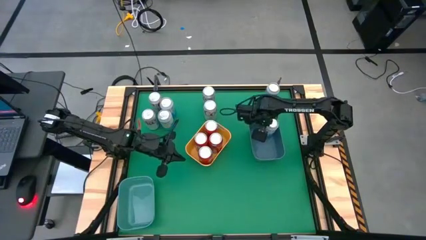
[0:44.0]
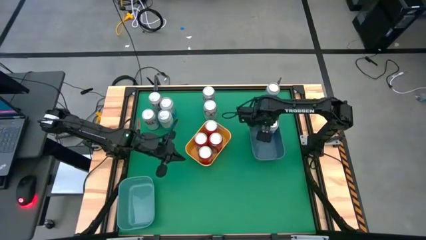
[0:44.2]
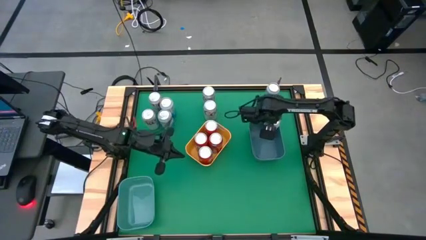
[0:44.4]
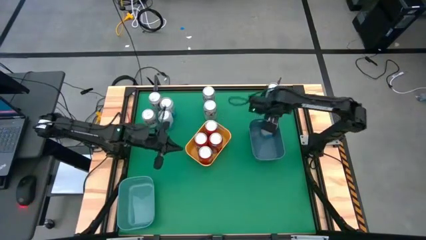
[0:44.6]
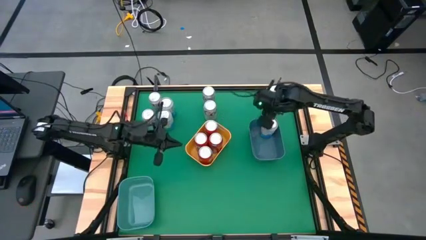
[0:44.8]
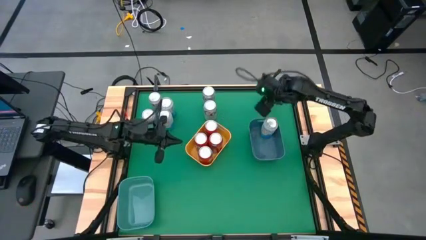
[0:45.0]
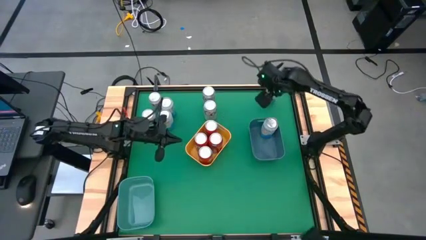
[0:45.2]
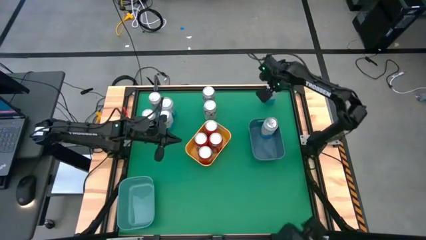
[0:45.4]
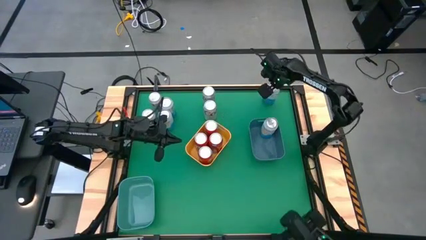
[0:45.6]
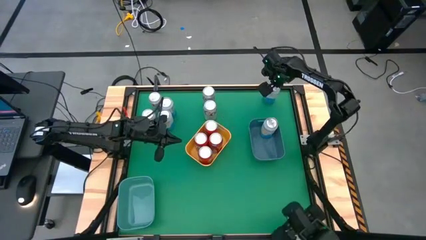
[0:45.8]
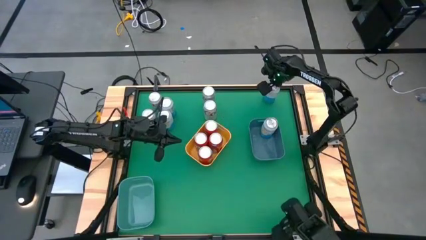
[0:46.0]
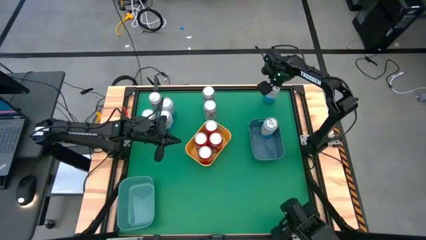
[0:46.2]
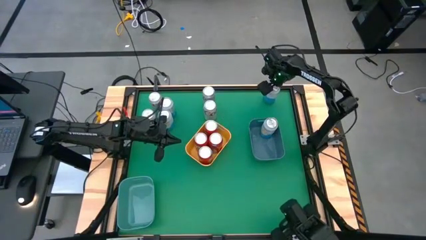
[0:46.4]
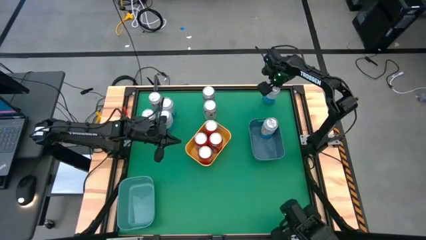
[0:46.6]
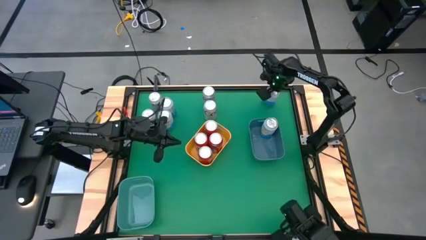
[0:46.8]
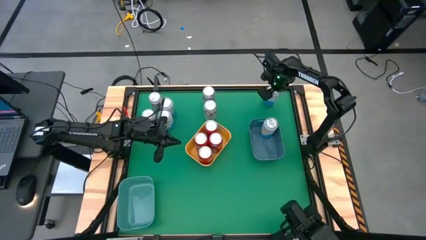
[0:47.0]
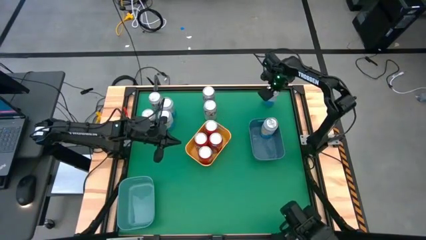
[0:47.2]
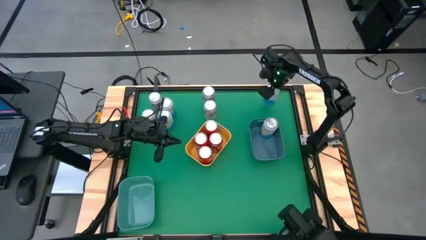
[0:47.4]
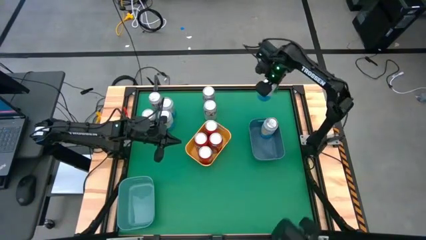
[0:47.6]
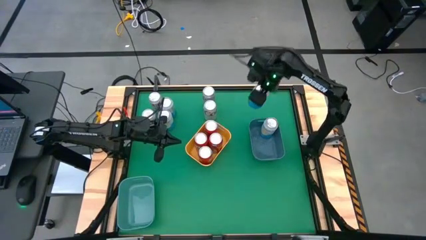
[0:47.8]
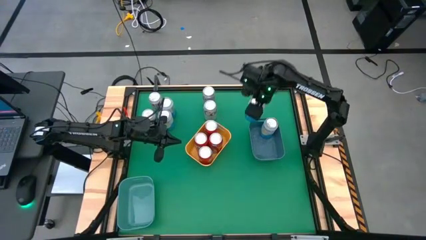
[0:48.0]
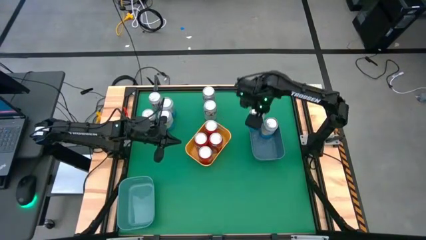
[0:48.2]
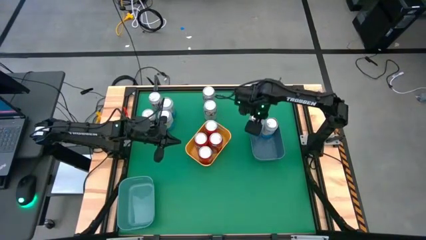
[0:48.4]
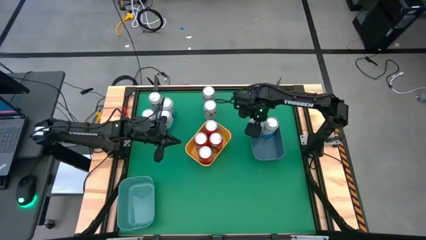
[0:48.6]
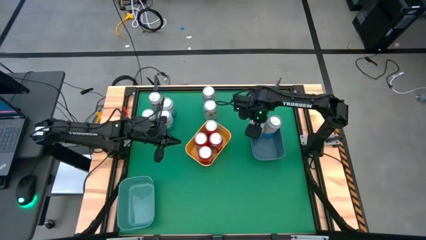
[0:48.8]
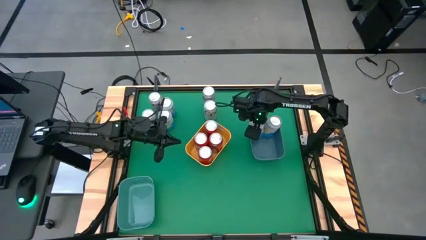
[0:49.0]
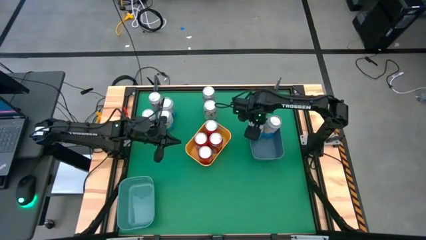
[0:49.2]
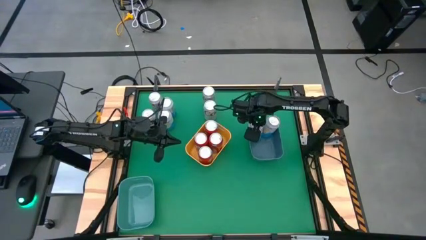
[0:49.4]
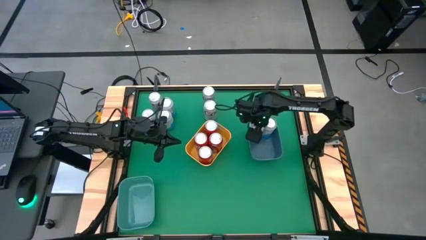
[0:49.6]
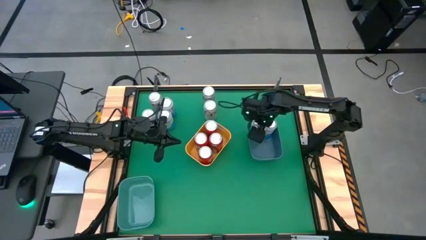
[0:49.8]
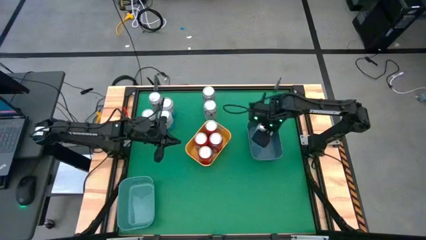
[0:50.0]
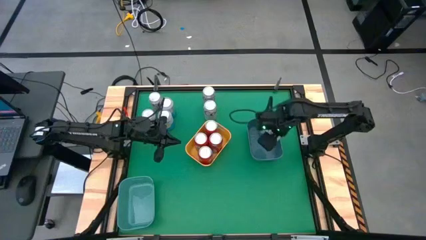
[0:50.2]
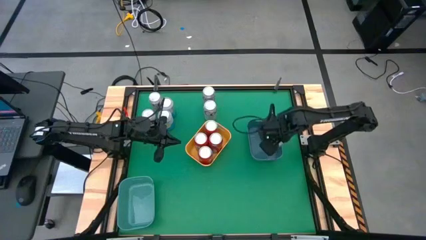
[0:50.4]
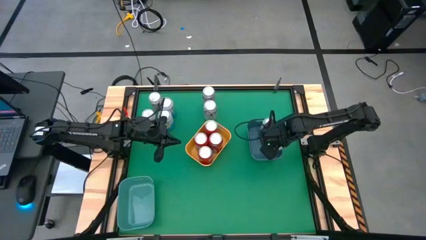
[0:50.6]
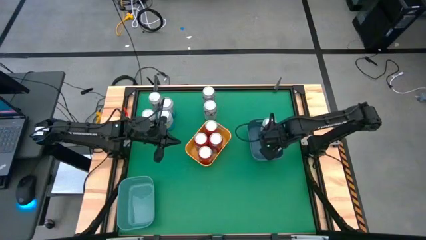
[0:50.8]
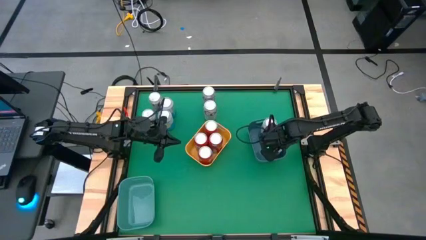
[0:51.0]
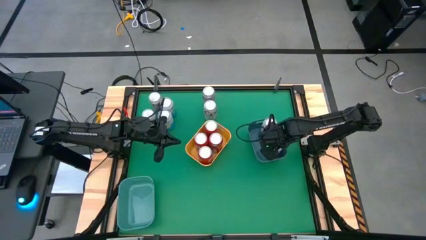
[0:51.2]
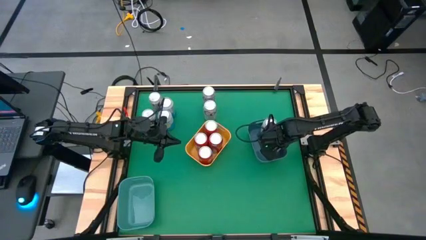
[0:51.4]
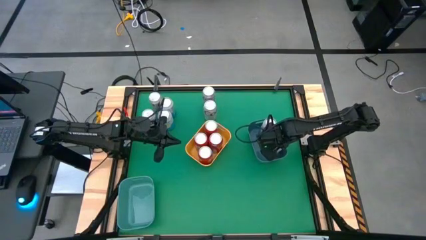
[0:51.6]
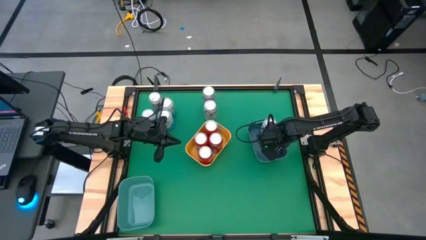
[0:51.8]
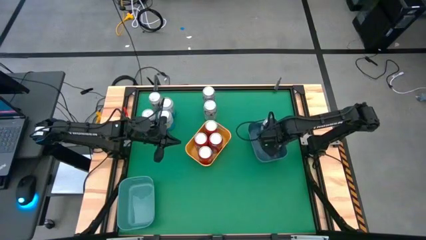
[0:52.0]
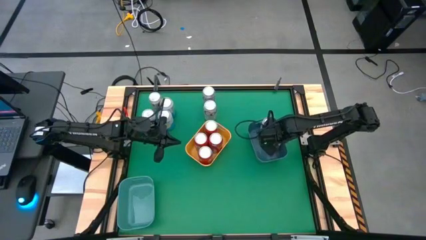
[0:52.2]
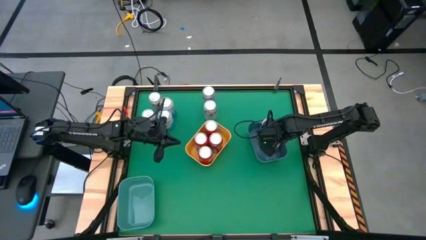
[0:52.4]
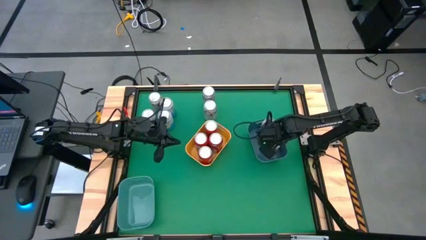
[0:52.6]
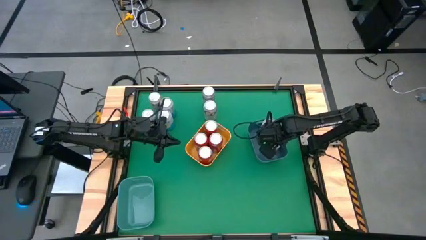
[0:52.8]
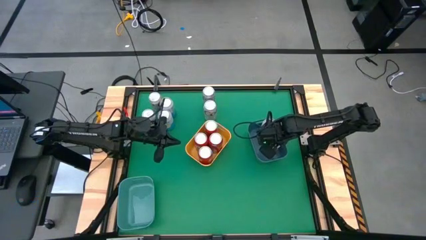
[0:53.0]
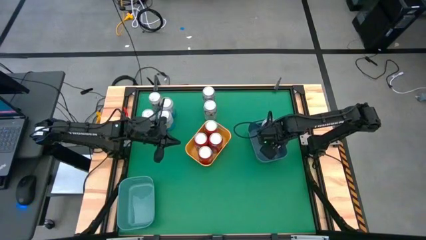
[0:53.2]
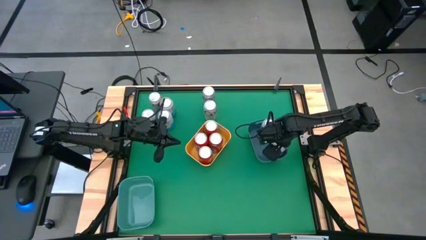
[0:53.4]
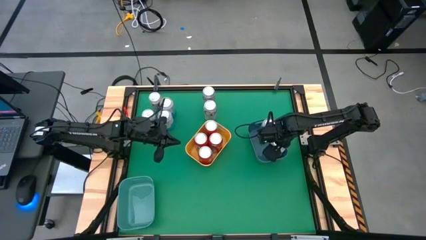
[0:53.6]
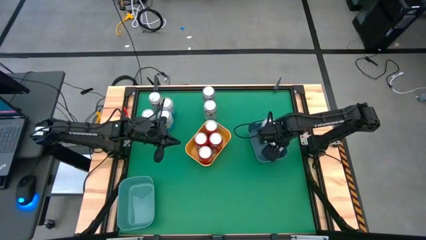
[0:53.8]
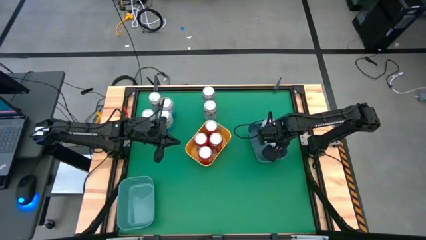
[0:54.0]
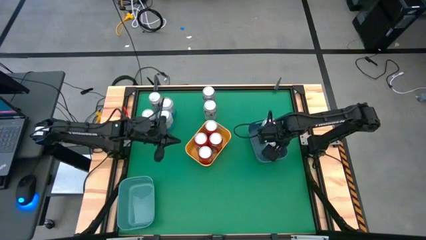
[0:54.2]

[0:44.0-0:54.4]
Task: Sort soda cans
Put the top right blue and white soda can into the blue bin

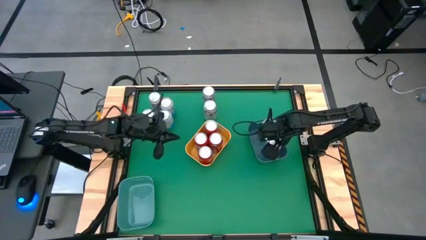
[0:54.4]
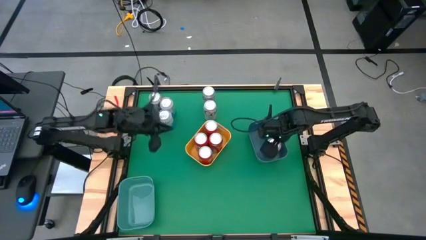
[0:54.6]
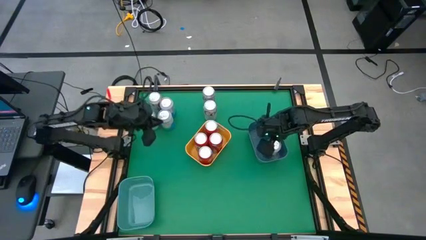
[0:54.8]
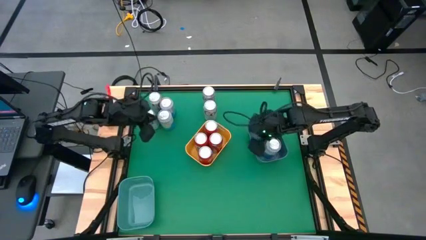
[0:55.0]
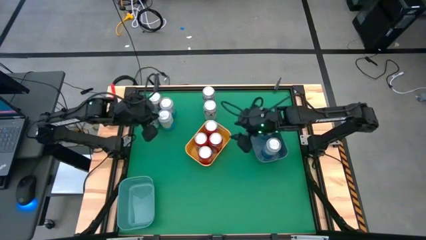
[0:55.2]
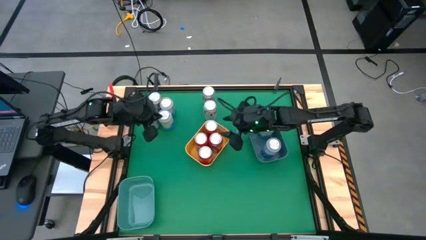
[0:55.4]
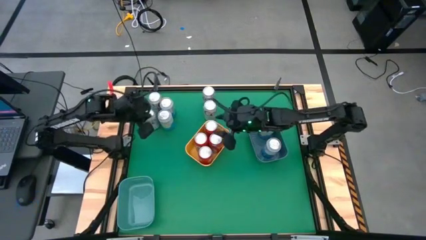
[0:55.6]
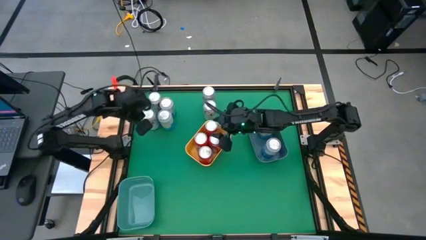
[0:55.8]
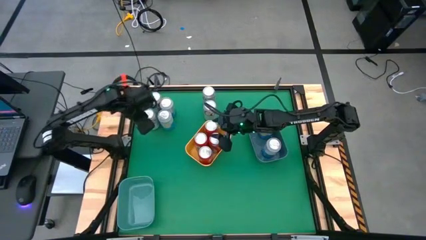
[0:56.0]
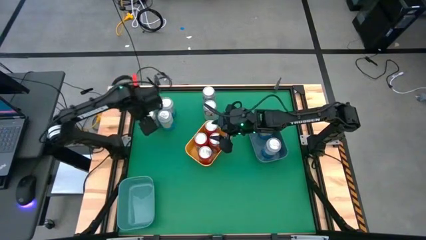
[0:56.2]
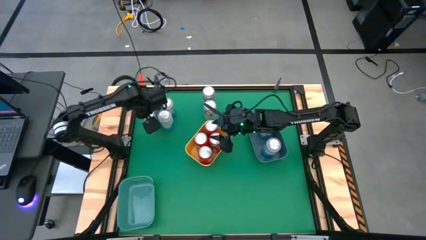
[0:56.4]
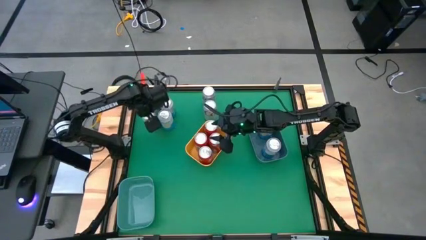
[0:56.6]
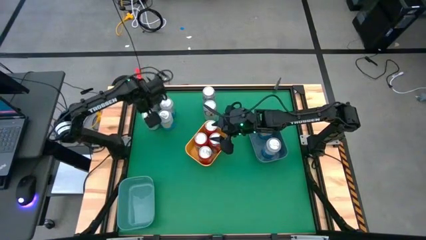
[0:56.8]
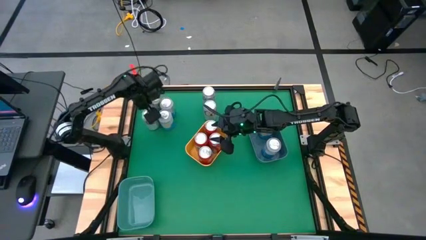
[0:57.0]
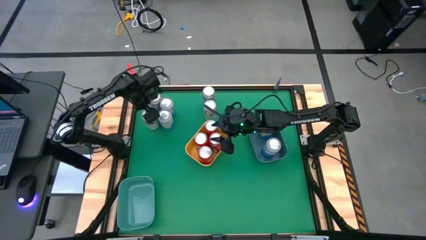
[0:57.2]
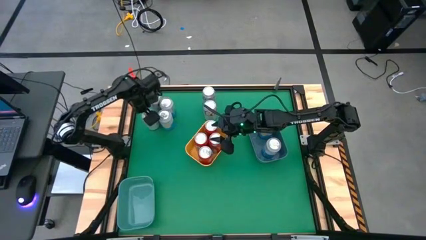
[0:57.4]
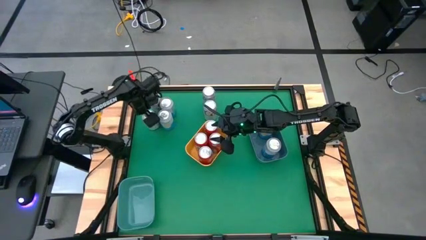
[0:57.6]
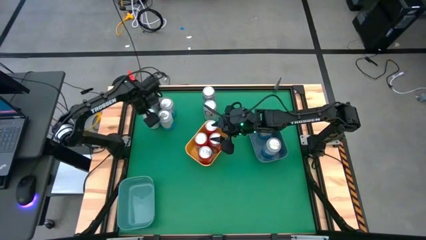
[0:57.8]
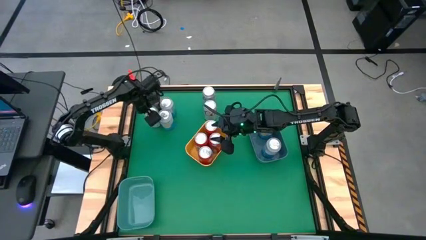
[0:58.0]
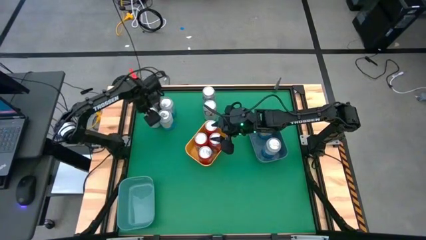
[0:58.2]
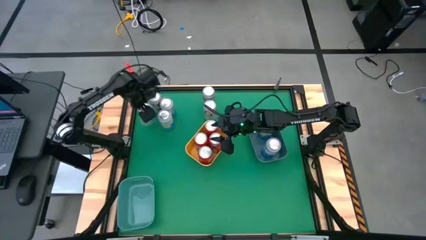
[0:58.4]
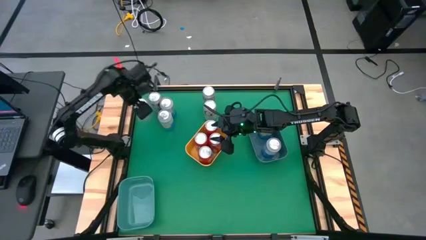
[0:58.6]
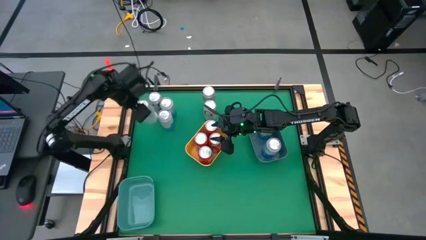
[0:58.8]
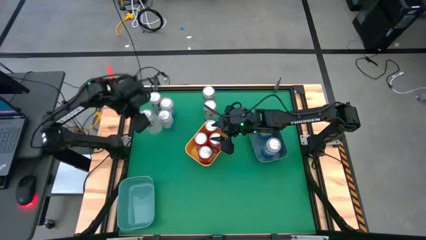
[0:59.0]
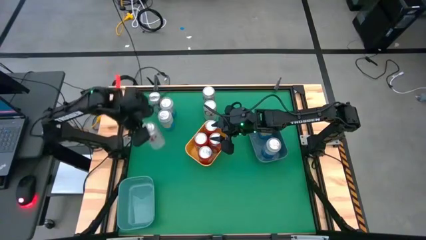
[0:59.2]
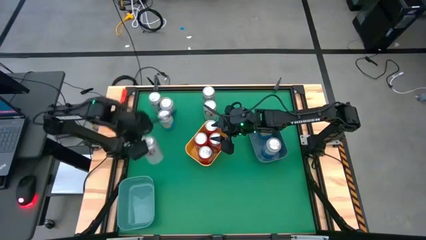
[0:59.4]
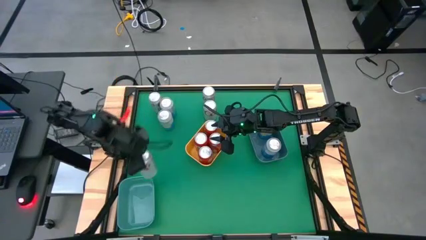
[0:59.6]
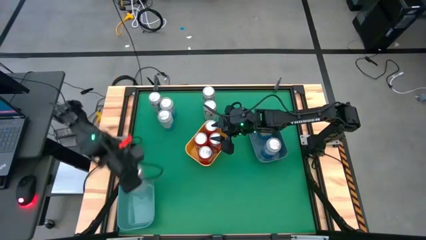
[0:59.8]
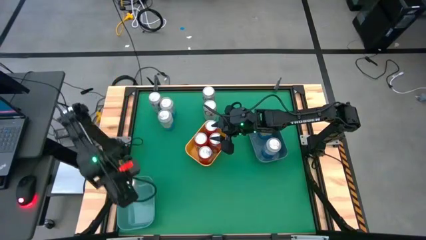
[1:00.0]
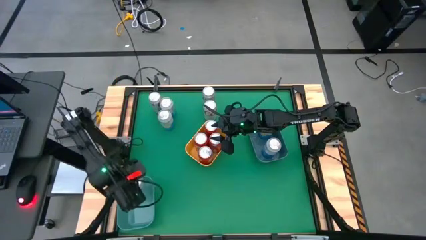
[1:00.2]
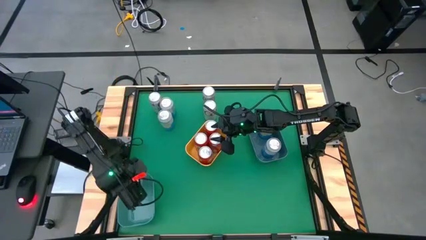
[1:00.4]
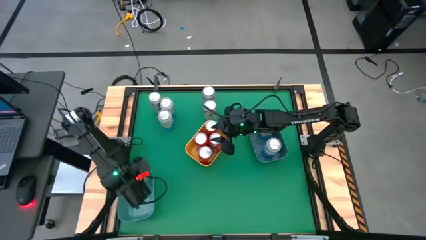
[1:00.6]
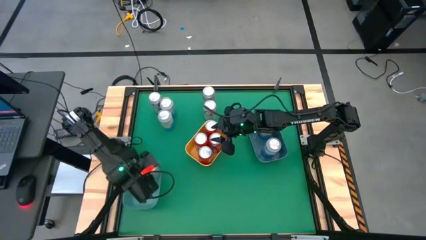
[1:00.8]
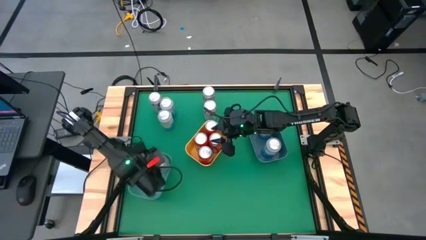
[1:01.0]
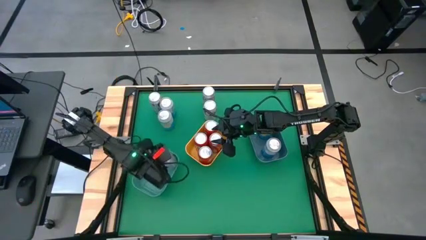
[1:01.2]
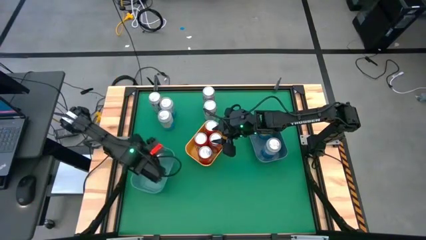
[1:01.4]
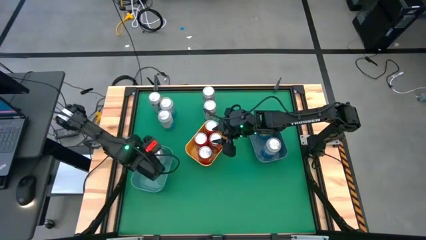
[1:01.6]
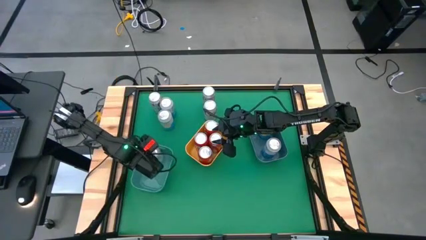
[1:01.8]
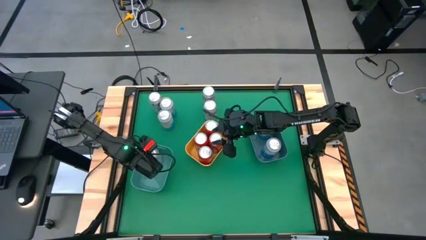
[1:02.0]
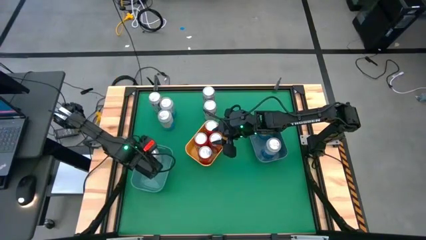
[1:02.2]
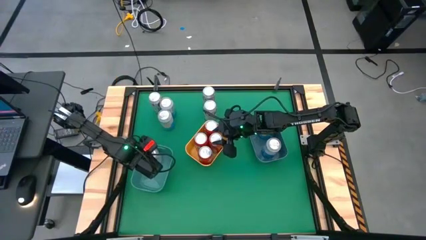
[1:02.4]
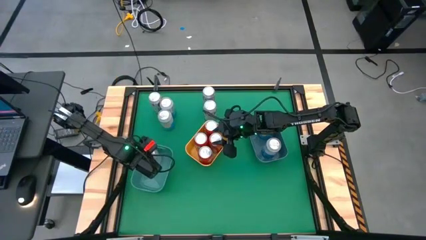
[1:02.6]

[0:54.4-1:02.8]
Put the bottom left white soda can into the green bin
